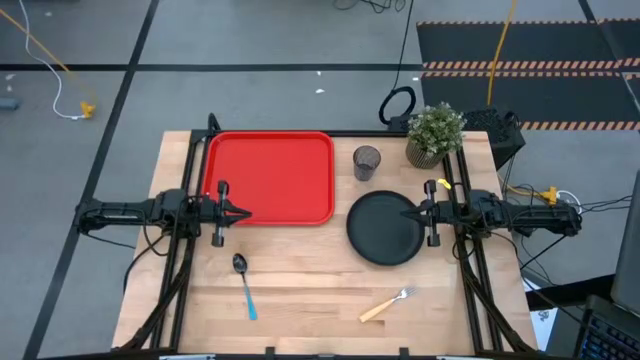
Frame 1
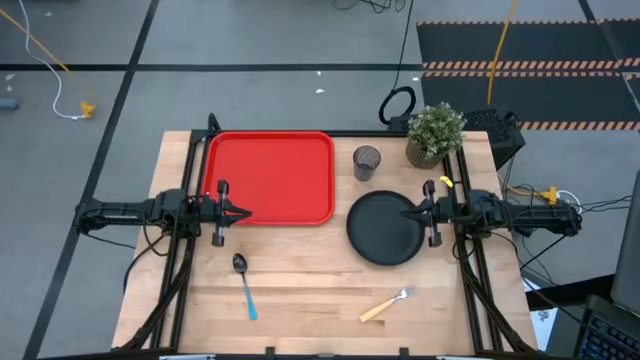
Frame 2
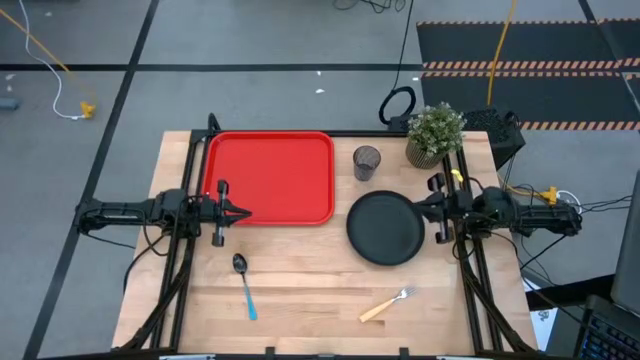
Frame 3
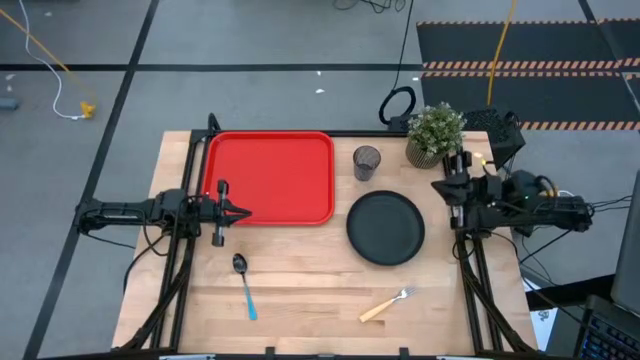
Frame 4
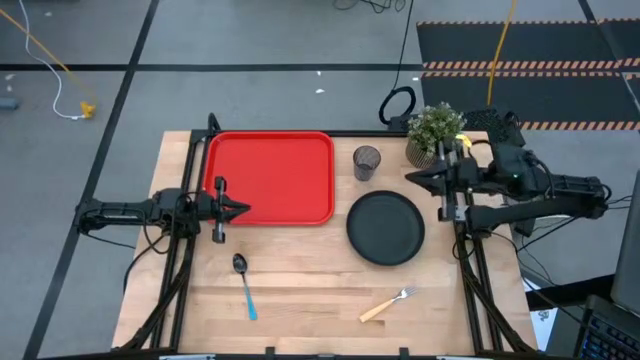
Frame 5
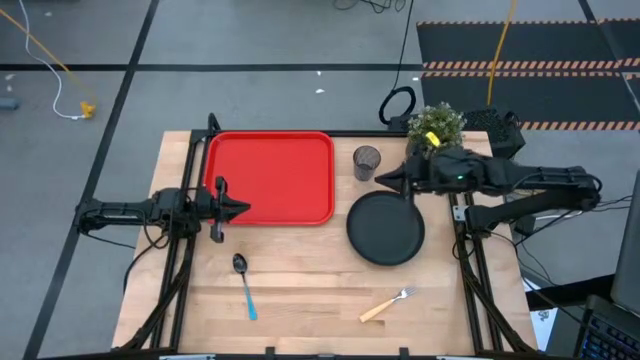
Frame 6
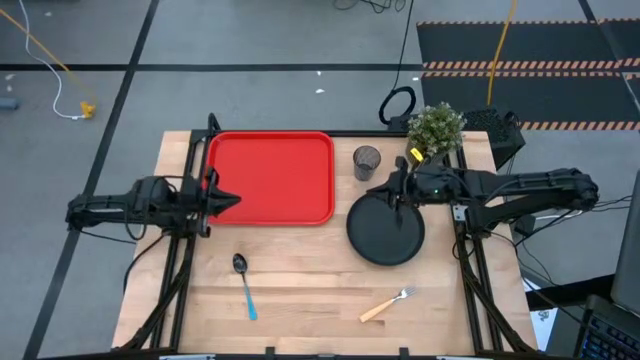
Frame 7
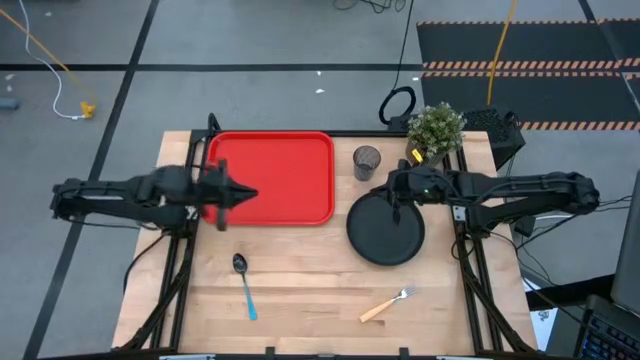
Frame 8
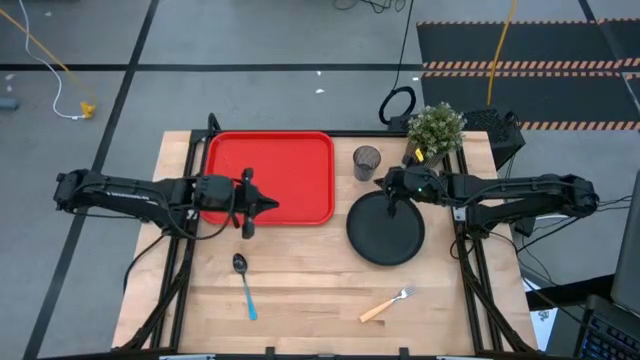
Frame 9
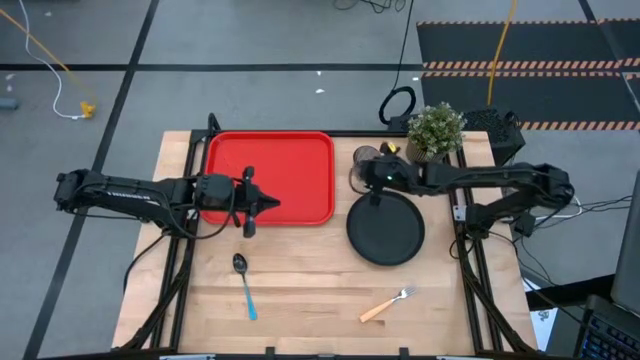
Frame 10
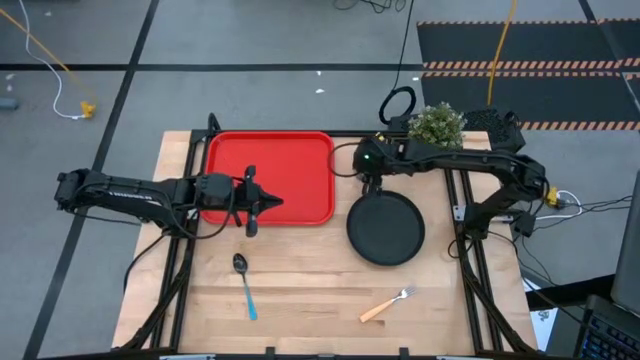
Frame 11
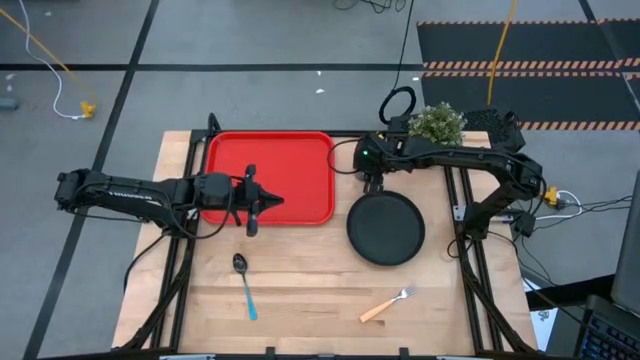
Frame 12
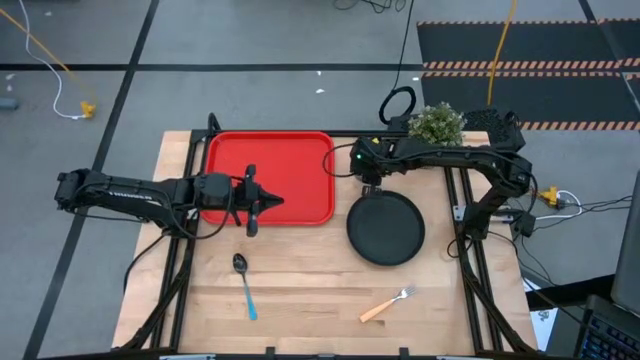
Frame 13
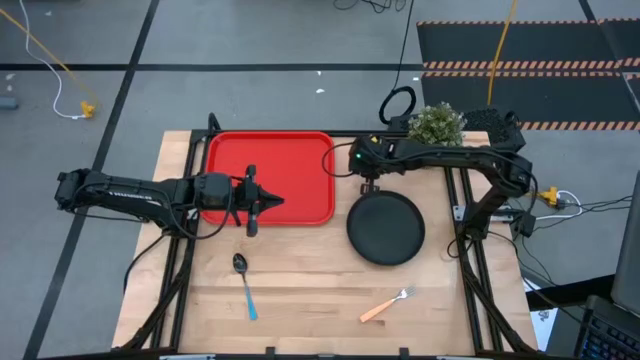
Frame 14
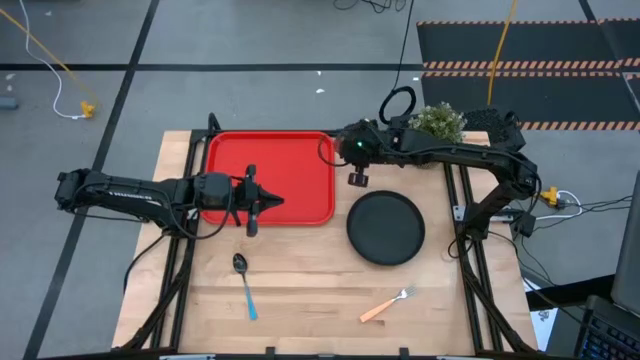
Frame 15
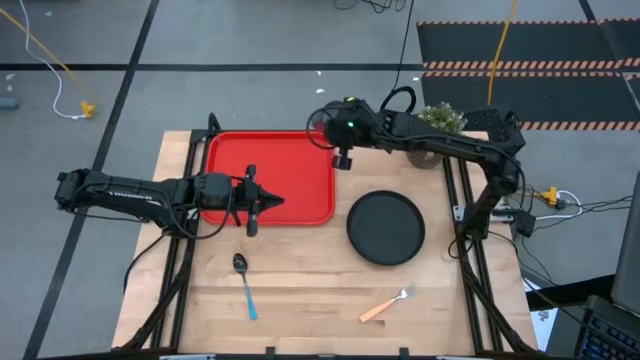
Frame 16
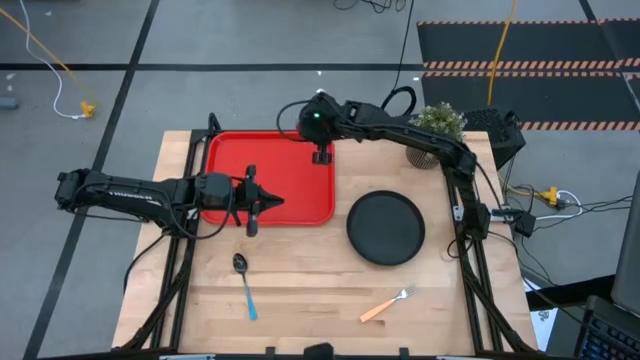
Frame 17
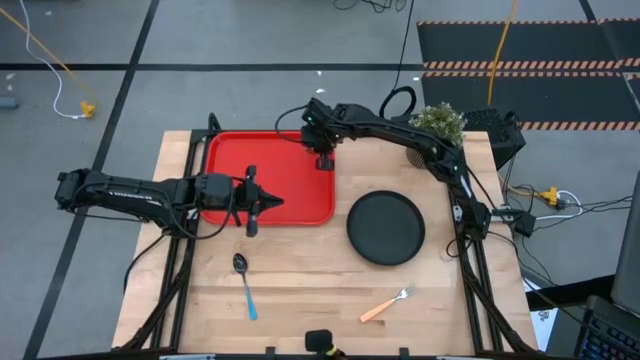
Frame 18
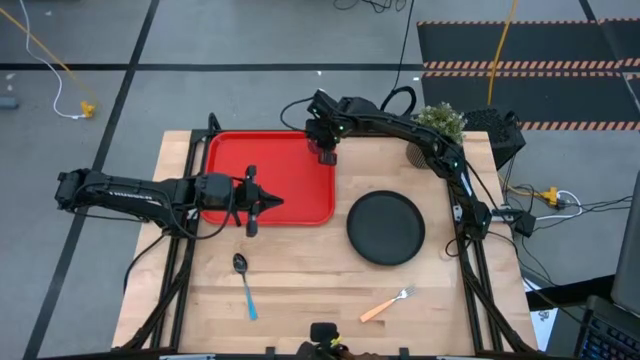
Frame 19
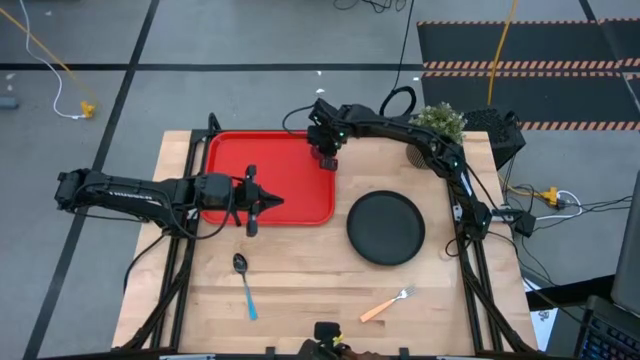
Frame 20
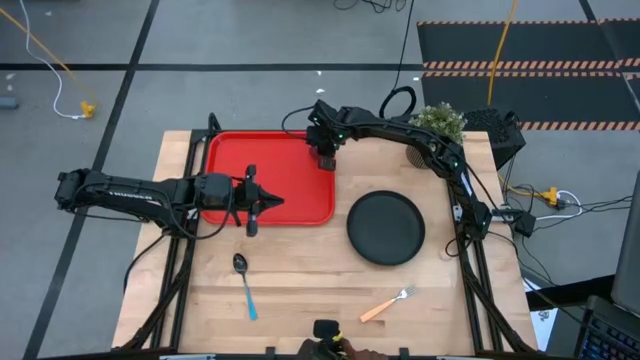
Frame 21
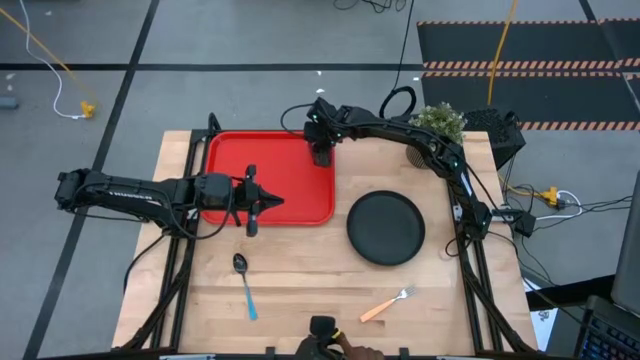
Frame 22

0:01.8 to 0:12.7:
Task: Pick and place plate/cup/fork/spoon on tray
Put the black cup on the top right of the red tray

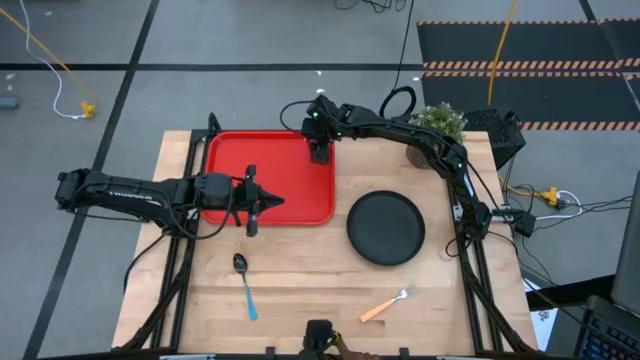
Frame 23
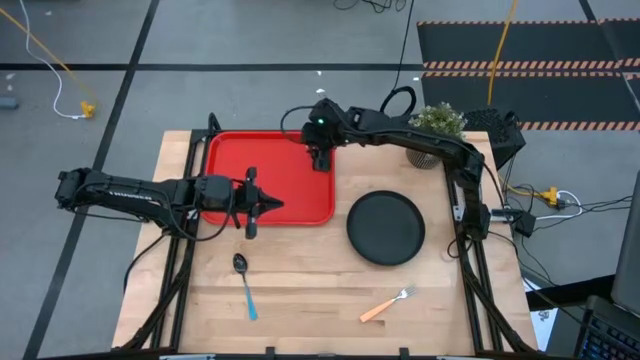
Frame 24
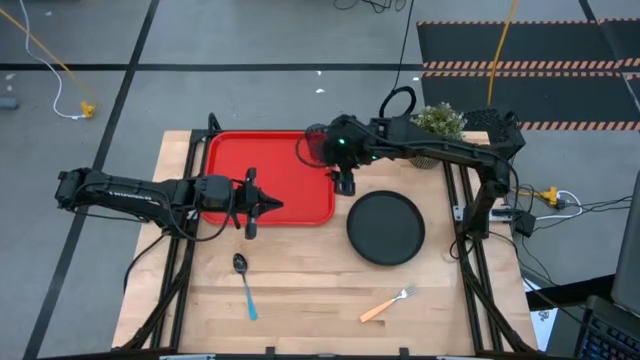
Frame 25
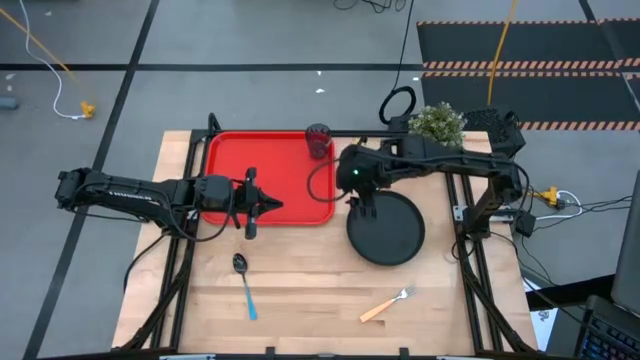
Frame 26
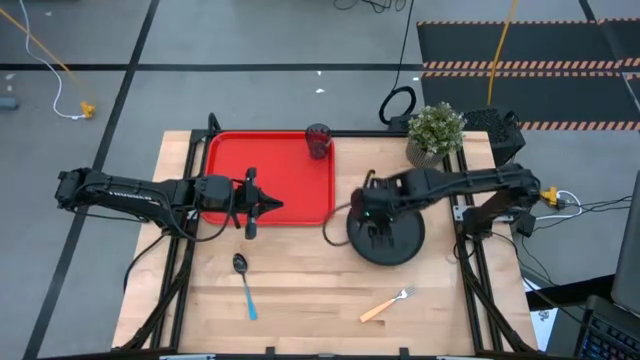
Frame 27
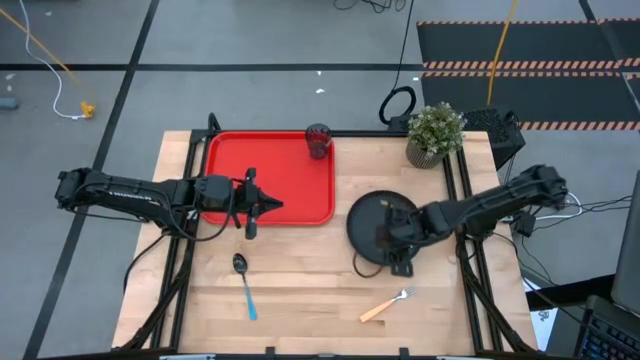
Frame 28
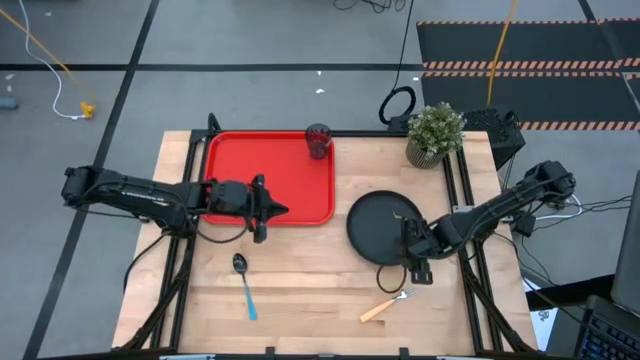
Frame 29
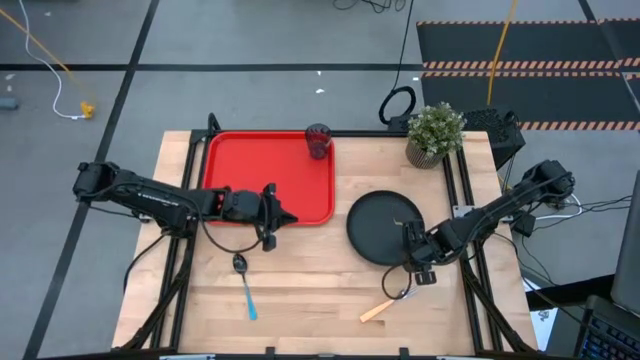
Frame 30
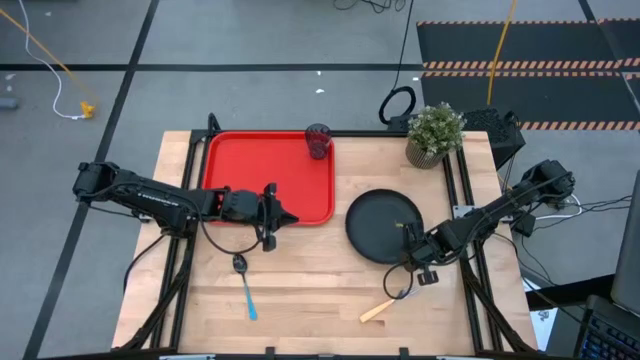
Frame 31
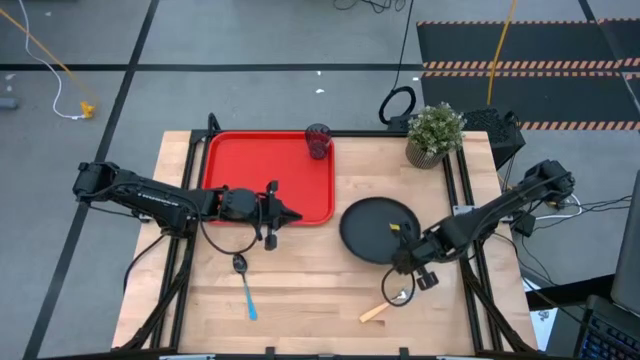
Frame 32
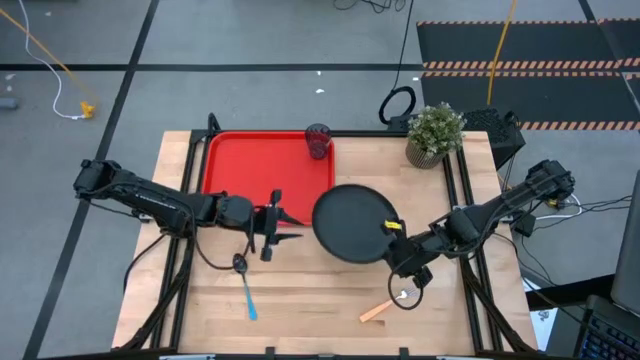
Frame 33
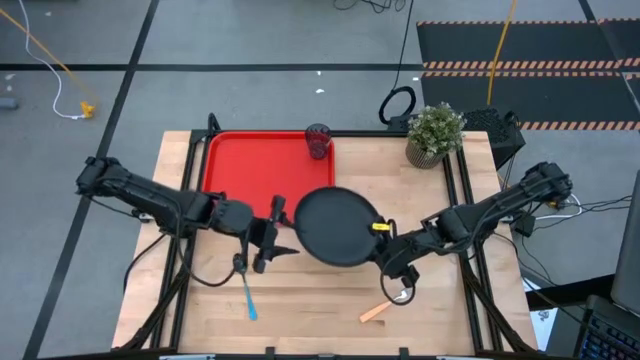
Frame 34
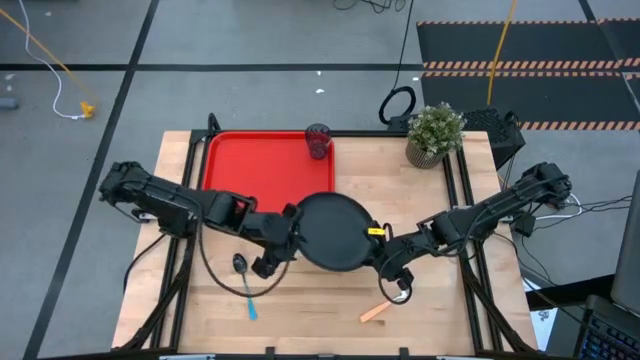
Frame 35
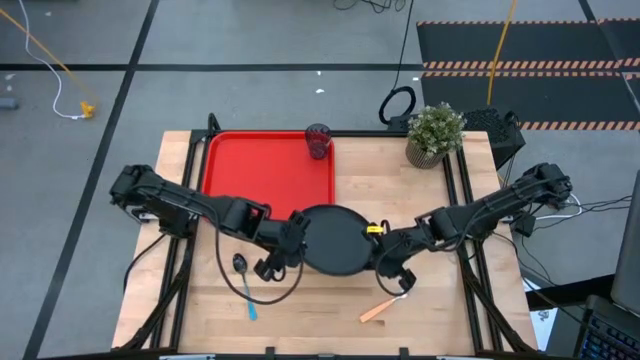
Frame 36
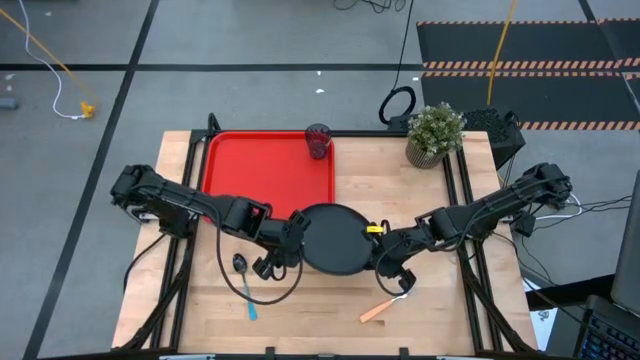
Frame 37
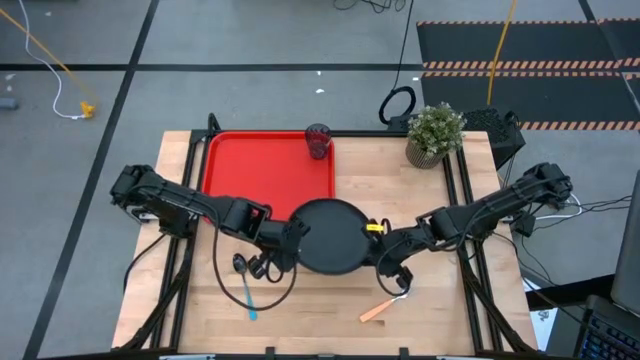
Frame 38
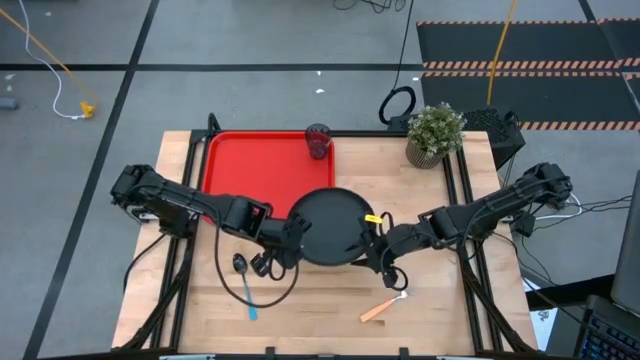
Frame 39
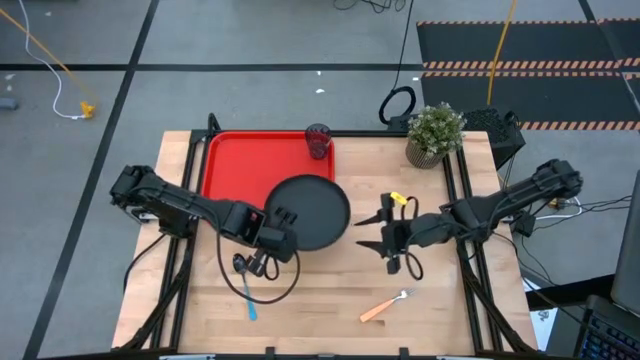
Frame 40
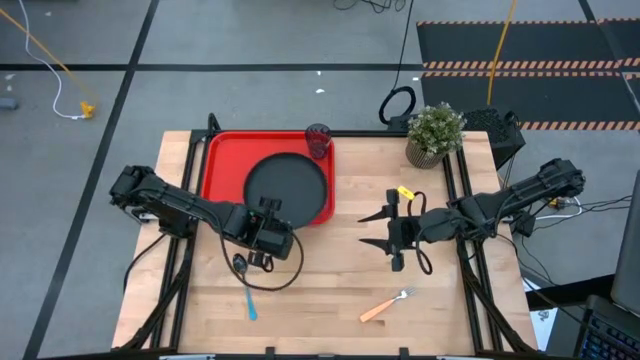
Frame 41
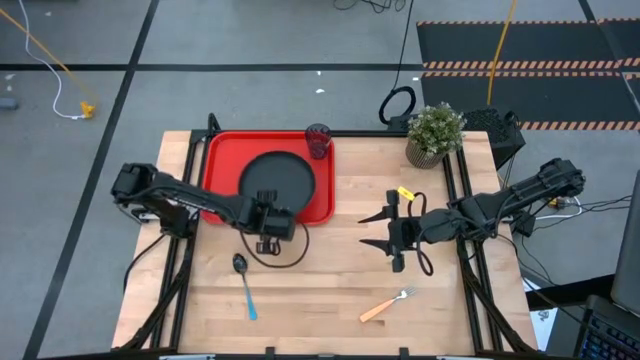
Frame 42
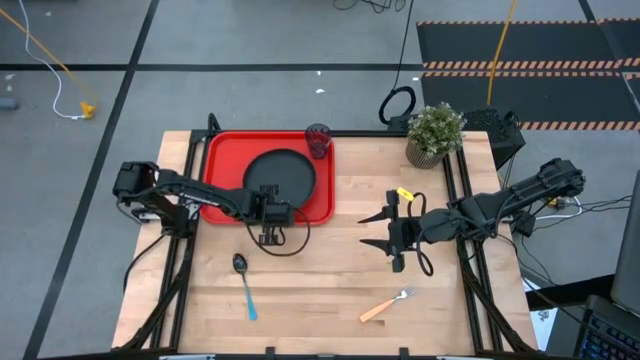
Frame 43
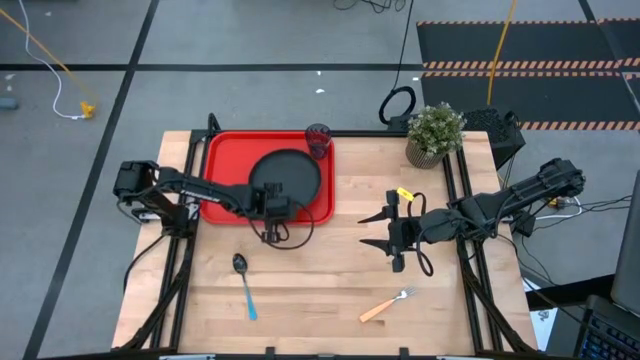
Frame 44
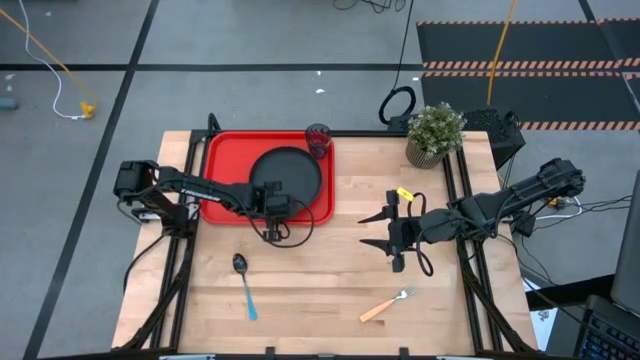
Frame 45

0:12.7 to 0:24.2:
Put the black plate on the red tray to the bottom left of the black cup
